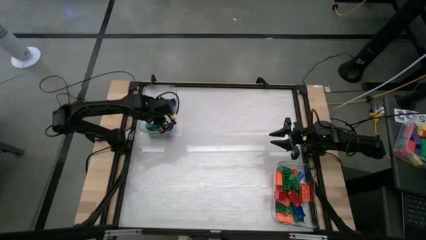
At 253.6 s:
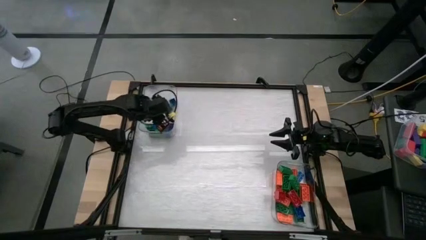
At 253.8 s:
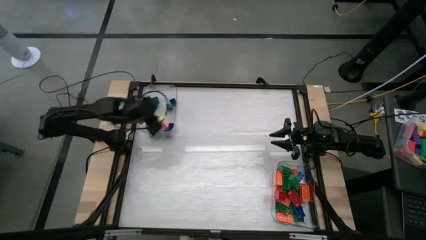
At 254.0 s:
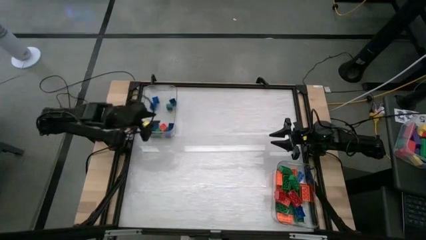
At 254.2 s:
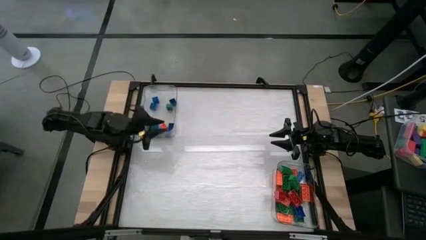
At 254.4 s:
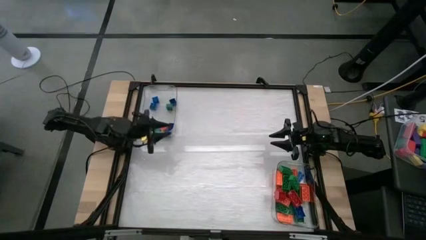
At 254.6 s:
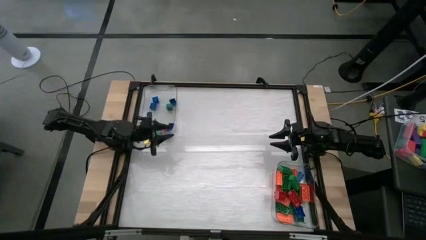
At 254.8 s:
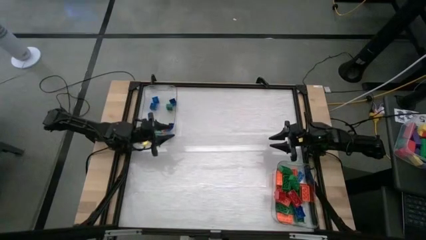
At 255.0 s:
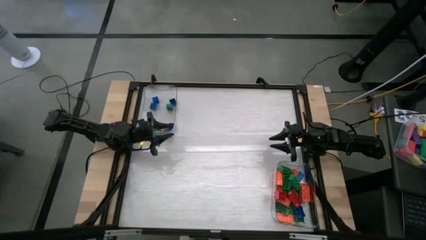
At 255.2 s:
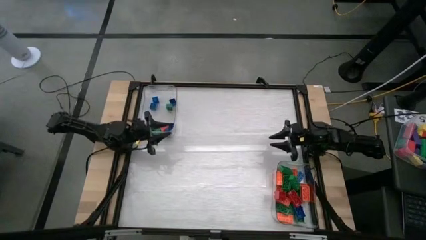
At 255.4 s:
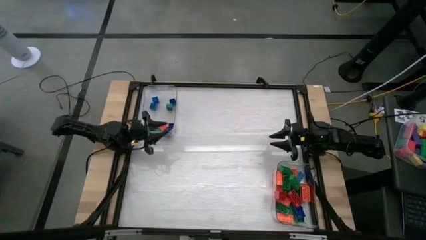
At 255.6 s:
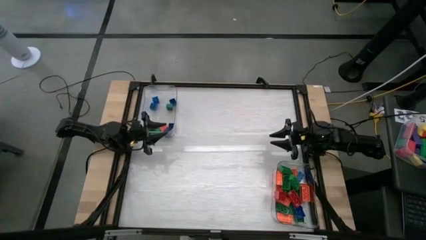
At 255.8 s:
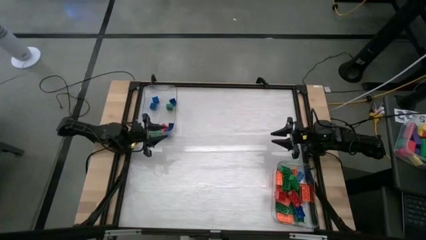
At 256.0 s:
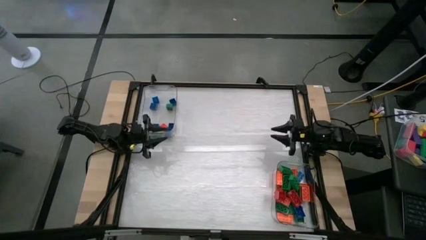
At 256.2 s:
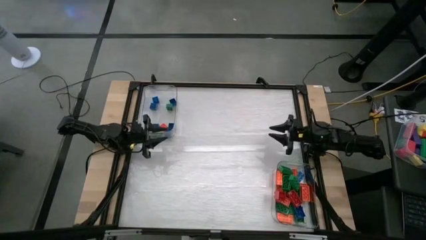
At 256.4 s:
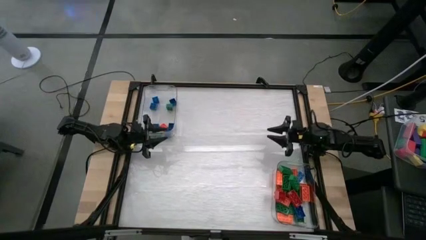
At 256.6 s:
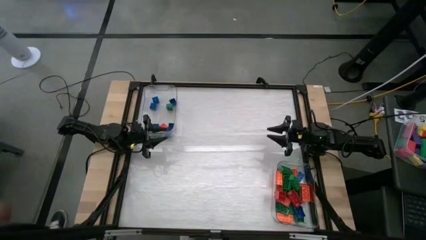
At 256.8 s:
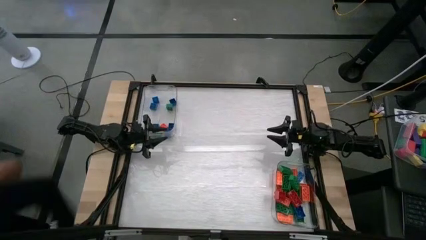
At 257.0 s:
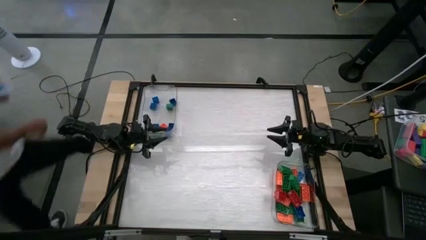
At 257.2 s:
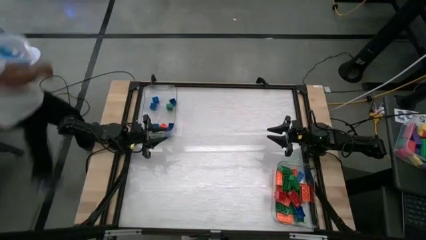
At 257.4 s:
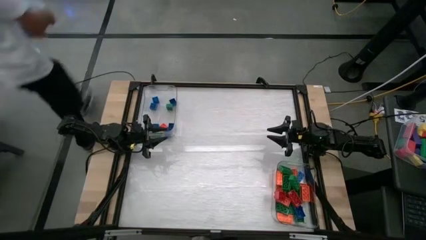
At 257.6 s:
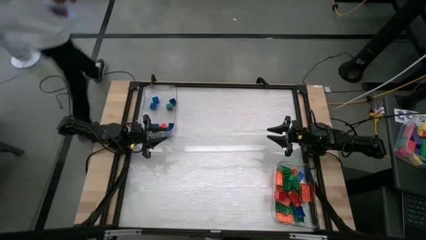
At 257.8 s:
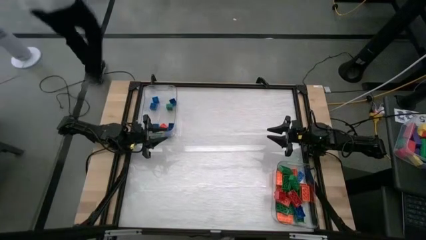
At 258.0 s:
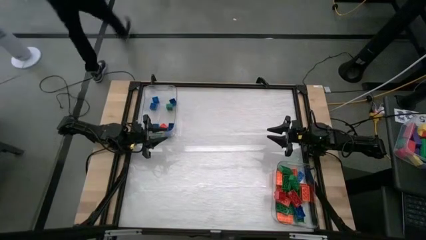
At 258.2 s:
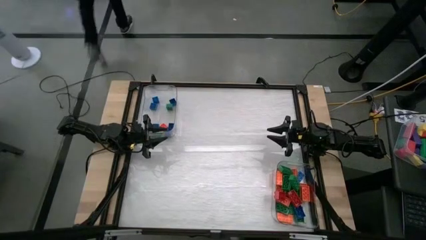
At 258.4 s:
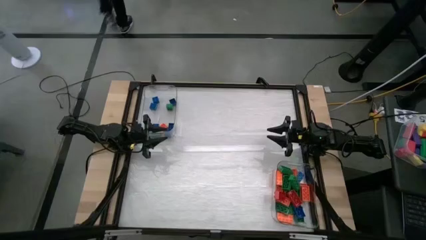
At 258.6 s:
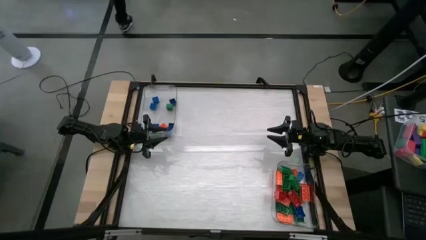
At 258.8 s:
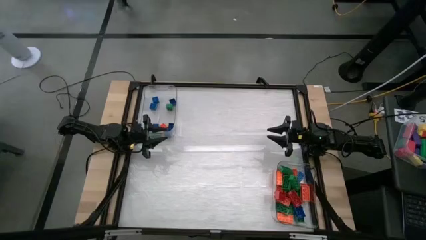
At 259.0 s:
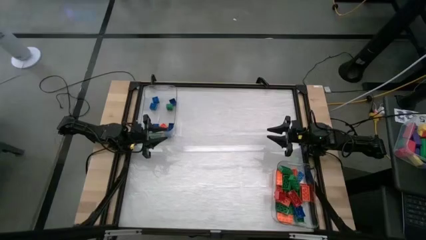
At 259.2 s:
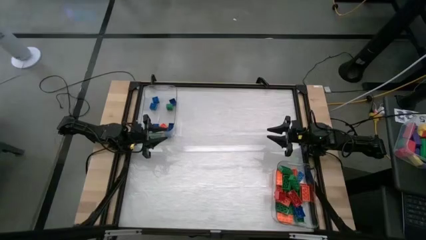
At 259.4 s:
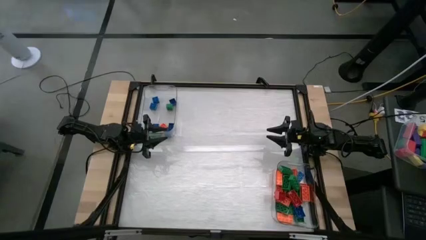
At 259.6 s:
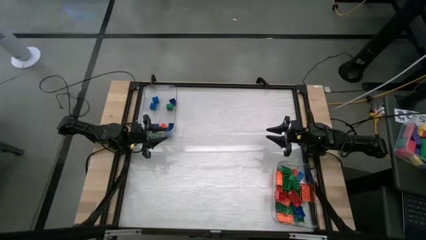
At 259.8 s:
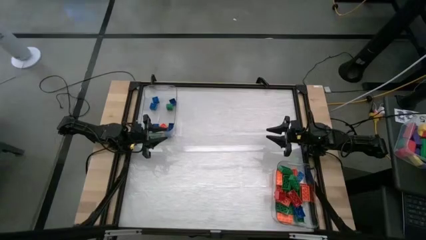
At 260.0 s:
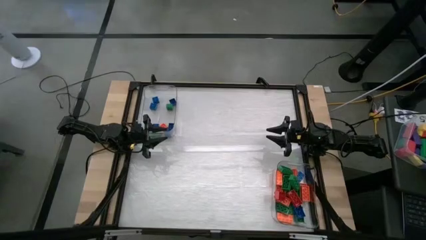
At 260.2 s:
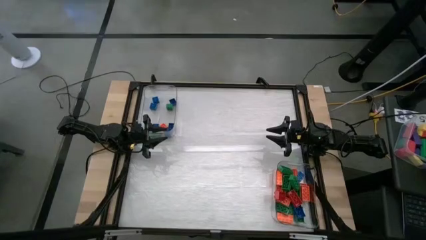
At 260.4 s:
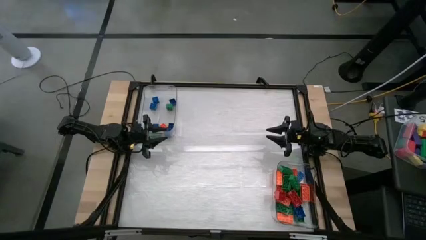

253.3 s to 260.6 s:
Task: Sort blocks by size
Return to Home Position

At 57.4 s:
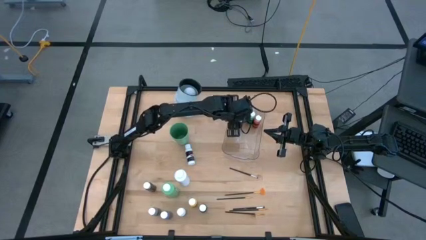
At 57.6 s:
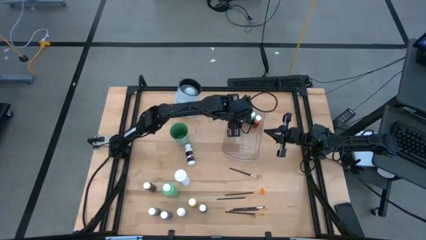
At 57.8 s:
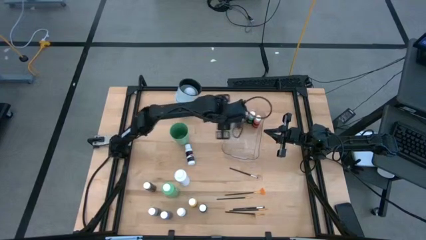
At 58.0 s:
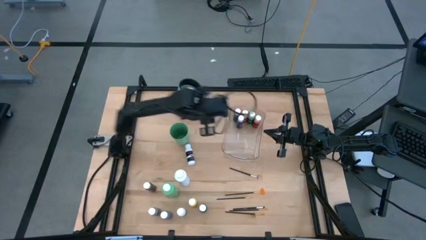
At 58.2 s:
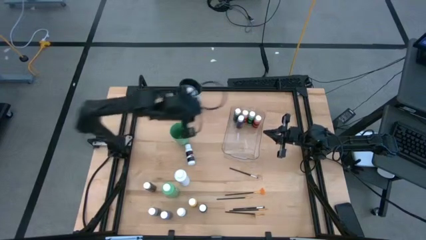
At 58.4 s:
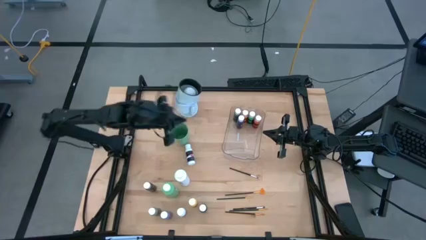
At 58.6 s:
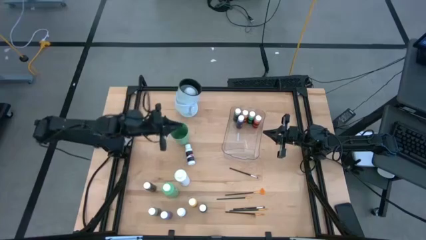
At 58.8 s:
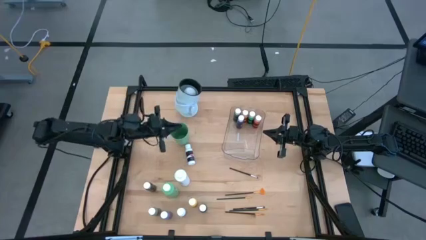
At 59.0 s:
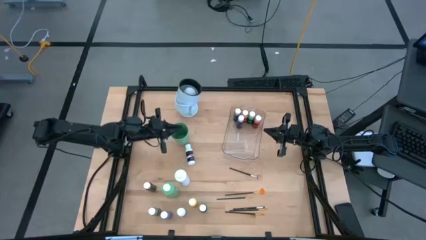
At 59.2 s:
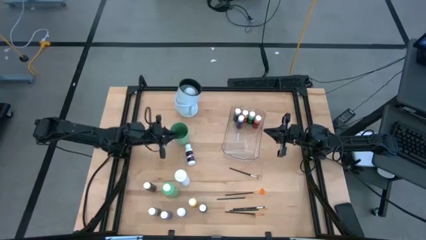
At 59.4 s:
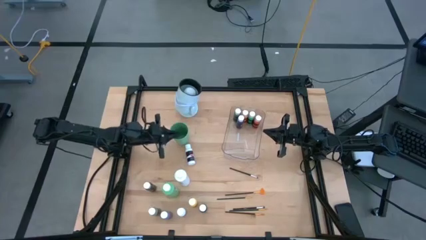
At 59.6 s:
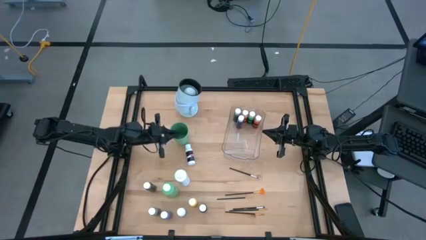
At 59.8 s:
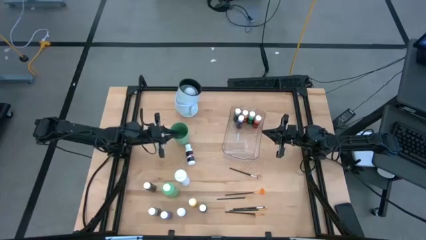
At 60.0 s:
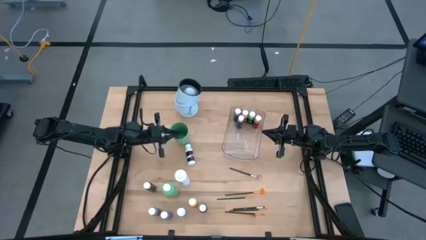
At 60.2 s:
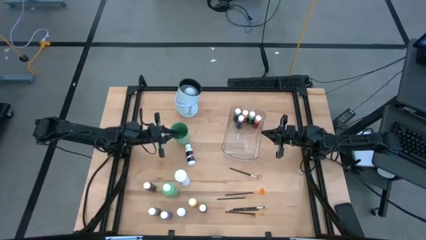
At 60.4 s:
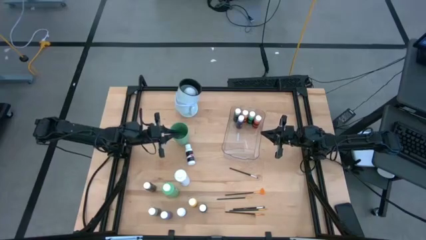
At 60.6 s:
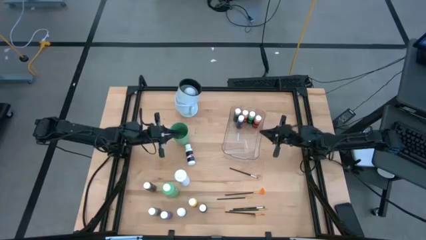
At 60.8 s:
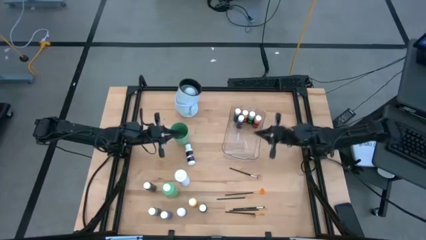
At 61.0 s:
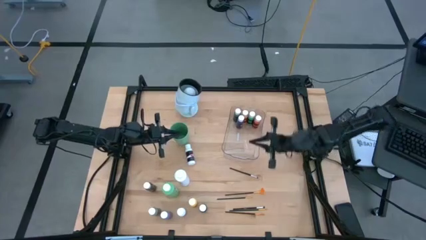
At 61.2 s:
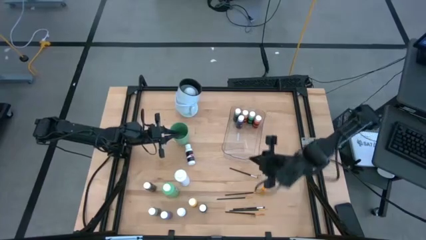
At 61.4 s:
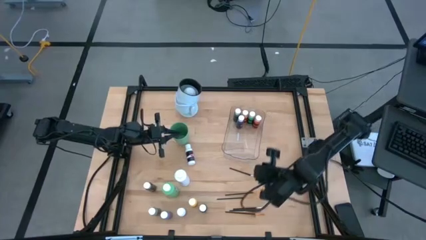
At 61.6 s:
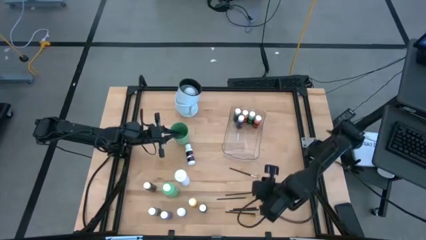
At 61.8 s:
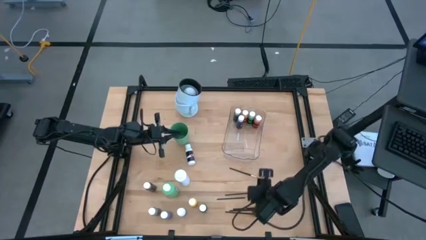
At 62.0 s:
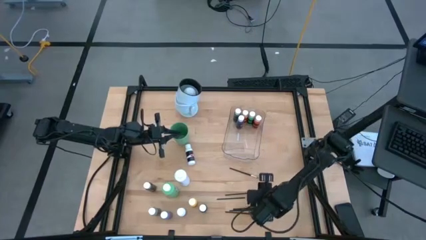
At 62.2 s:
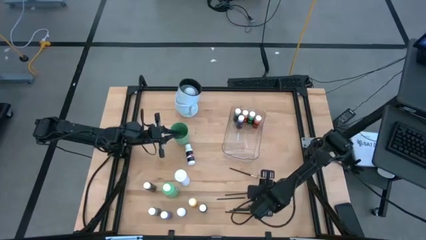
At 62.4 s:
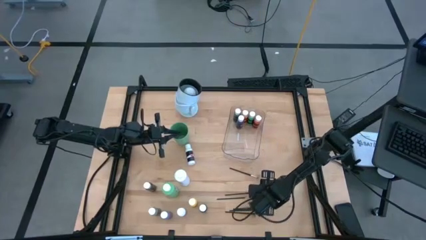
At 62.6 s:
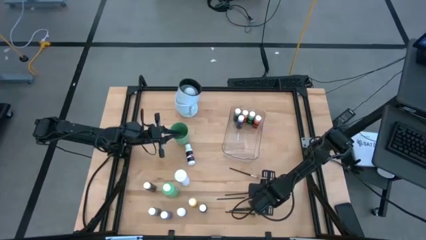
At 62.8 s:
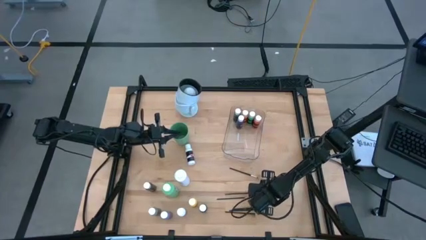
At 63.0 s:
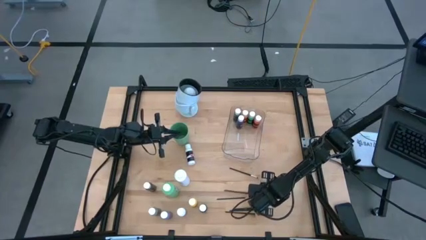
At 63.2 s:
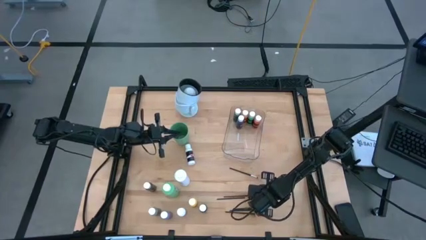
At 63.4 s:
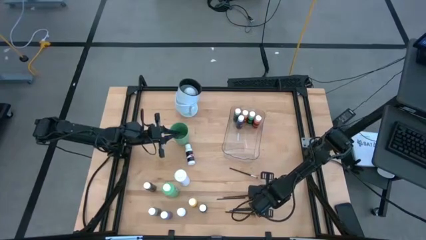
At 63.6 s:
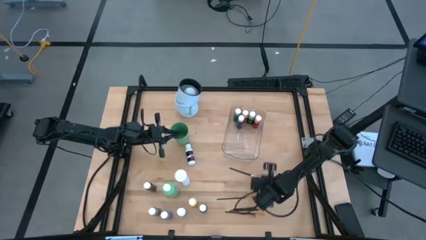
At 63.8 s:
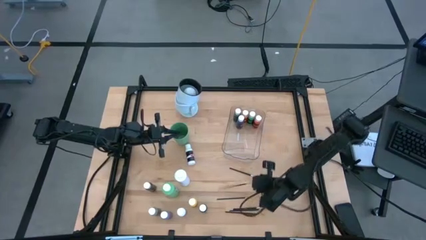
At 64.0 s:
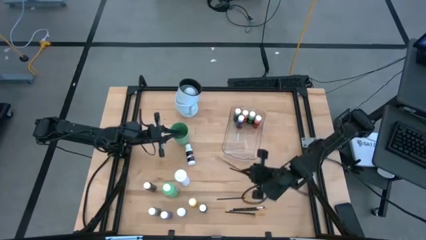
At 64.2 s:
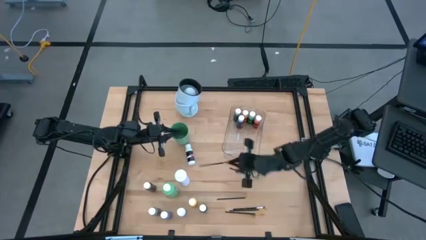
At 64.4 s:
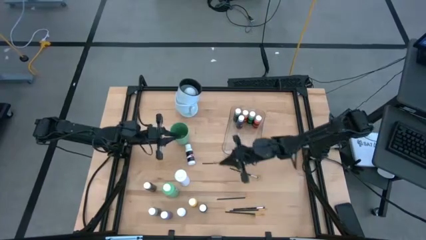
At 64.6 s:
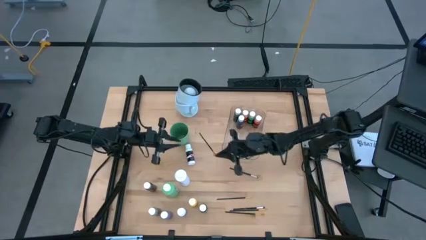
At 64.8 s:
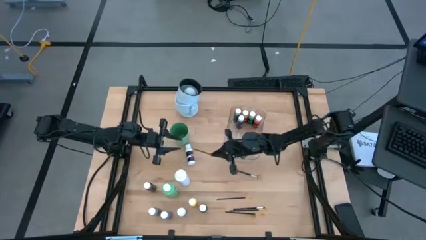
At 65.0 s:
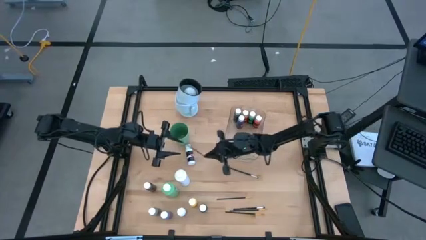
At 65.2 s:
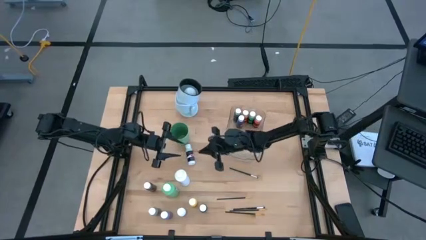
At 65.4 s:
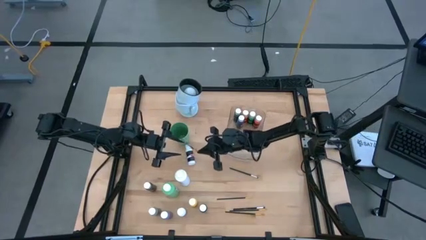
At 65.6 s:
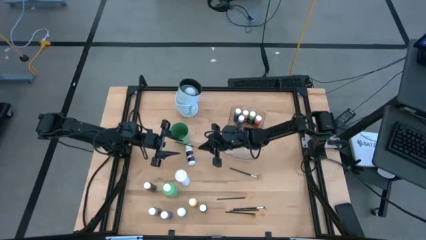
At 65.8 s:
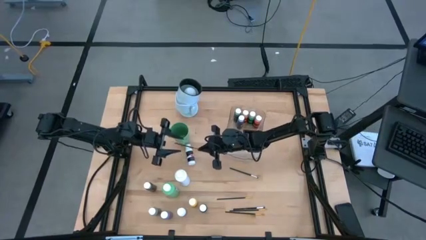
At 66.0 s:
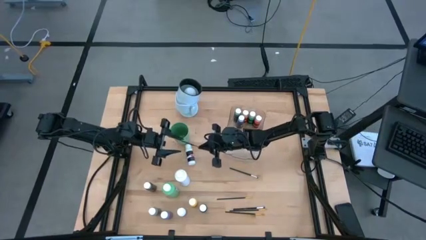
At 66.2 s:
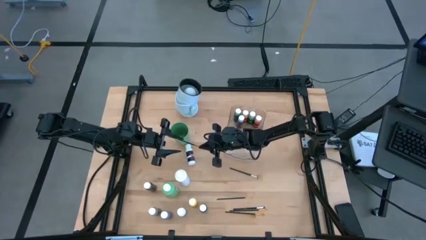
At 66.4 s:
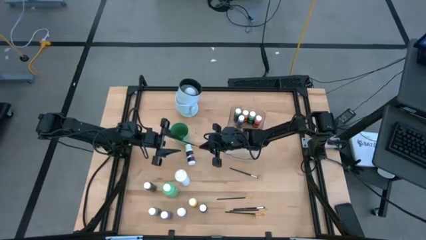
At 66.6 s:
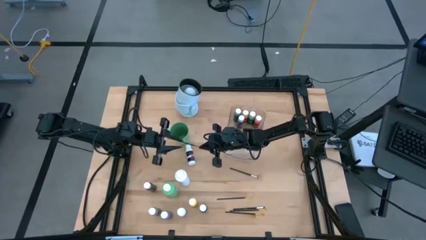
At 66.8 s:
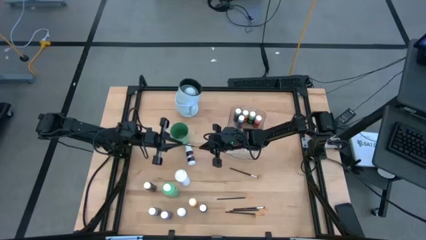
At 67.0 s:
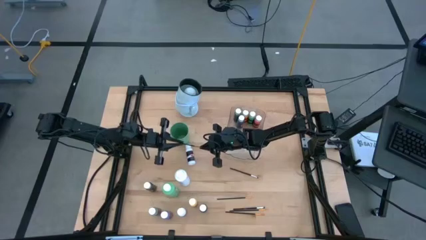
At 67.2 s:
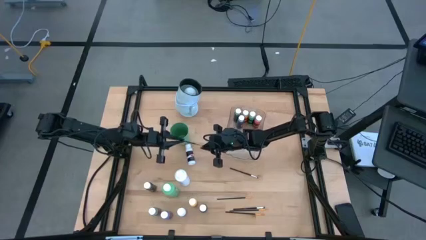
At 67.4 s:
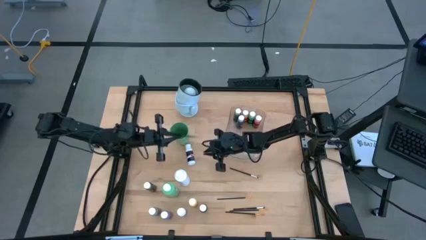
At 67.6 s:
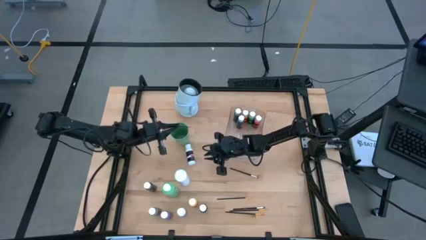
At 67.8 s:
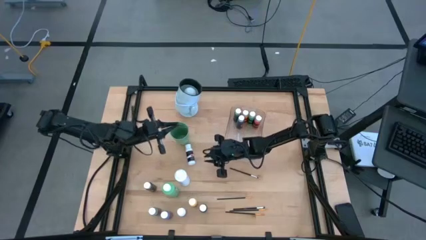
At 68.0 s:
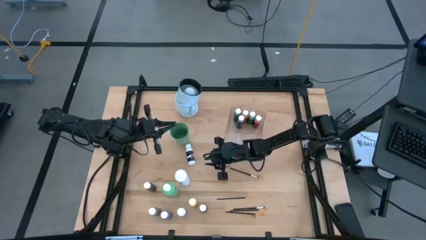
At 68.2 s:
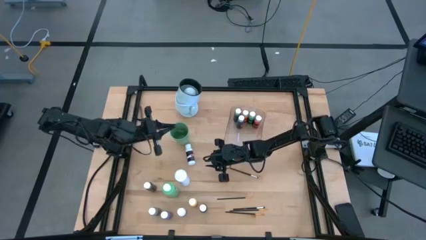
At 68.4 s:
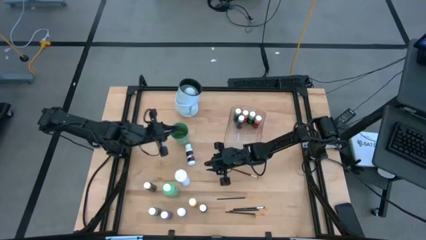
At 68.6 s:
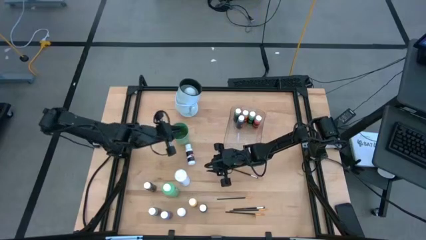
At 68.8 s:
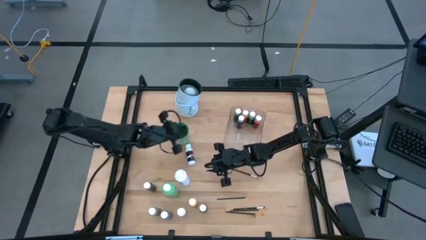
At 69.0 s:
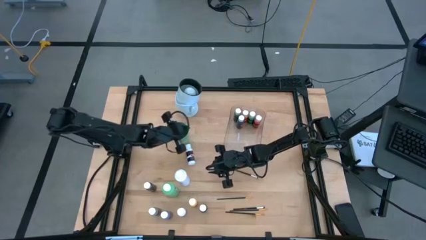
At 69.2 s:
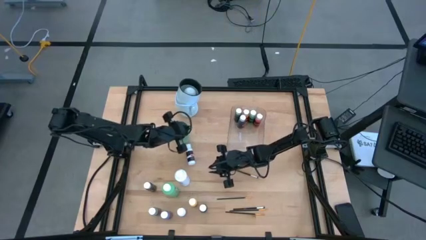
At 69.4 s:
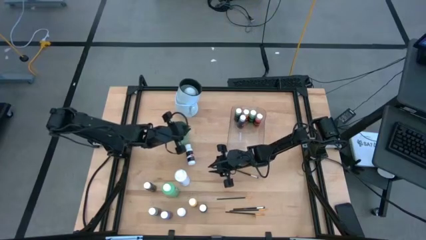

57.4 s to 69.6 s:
Task: Pick & Place Paint Supplies
Put the paint brush into the cup
